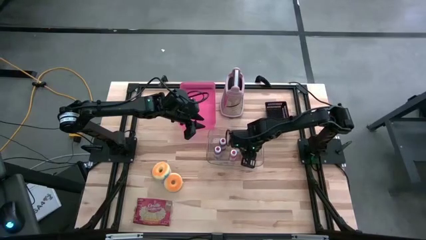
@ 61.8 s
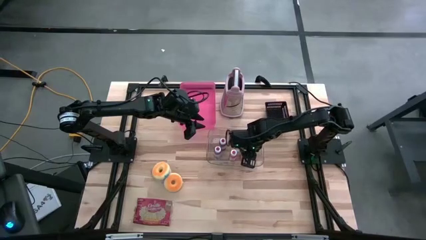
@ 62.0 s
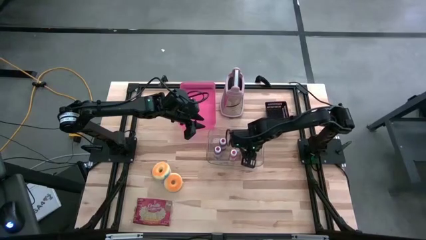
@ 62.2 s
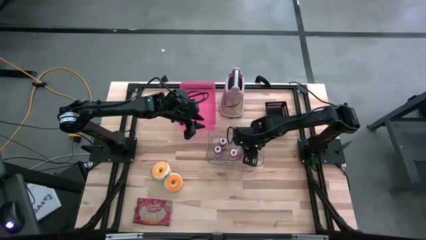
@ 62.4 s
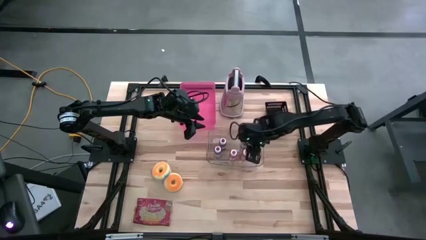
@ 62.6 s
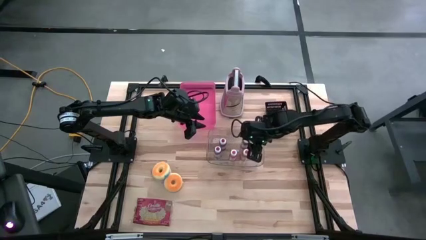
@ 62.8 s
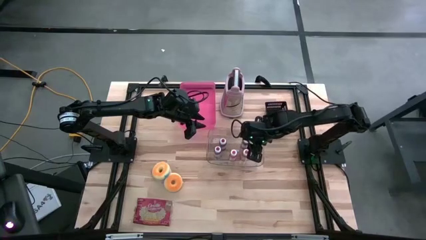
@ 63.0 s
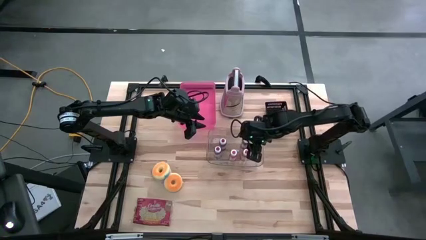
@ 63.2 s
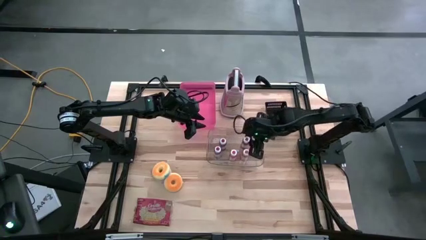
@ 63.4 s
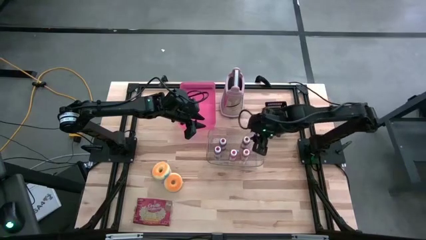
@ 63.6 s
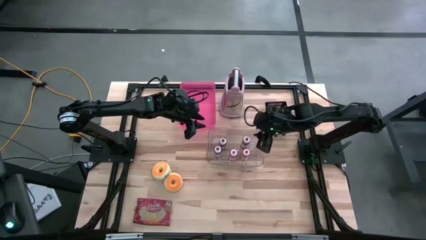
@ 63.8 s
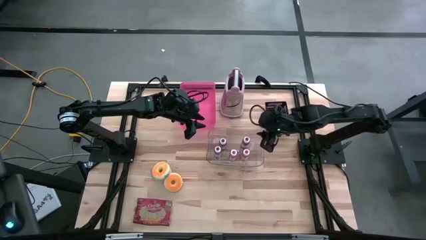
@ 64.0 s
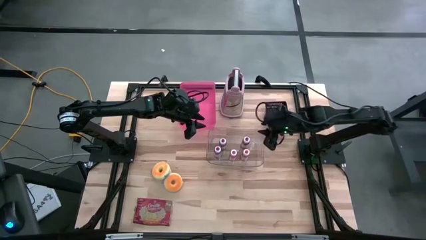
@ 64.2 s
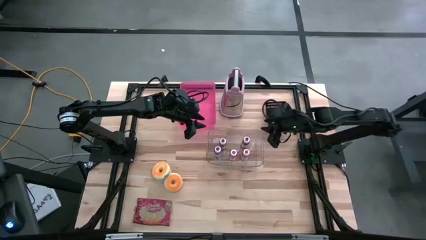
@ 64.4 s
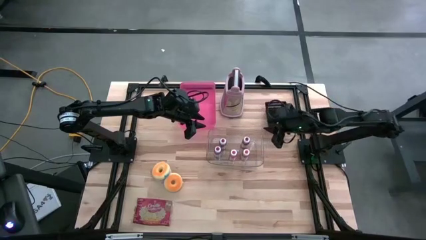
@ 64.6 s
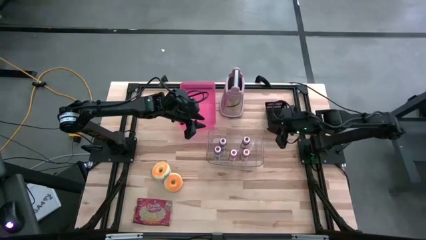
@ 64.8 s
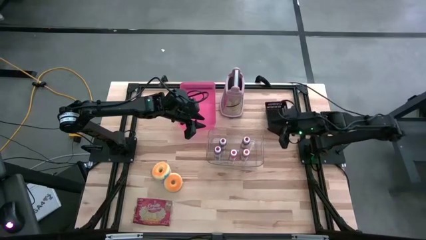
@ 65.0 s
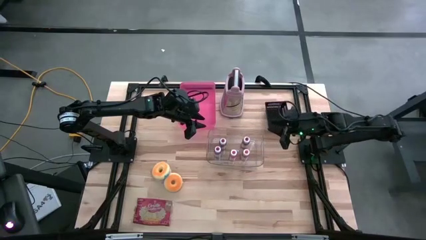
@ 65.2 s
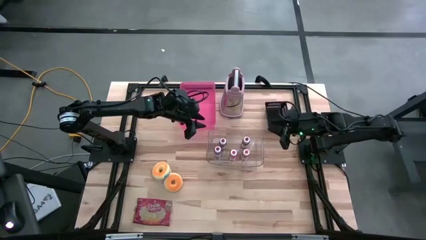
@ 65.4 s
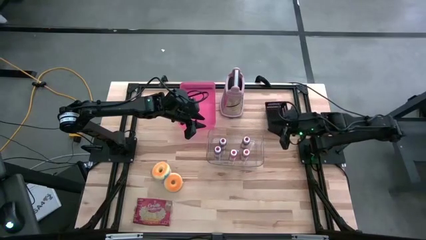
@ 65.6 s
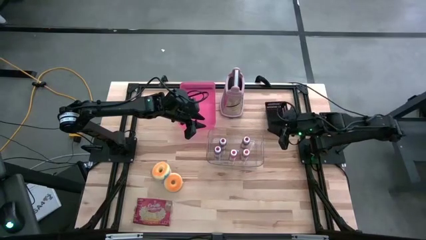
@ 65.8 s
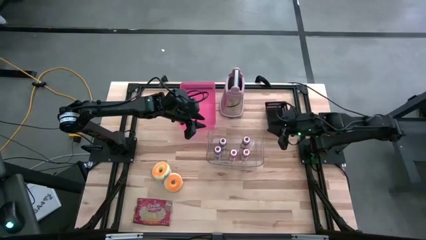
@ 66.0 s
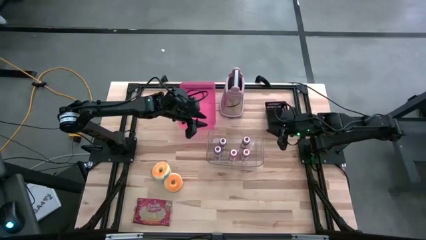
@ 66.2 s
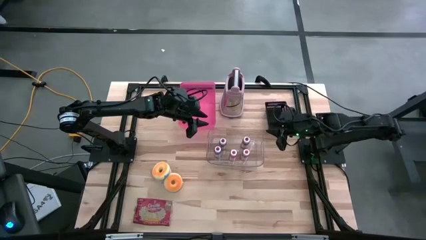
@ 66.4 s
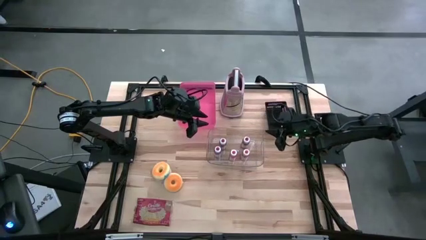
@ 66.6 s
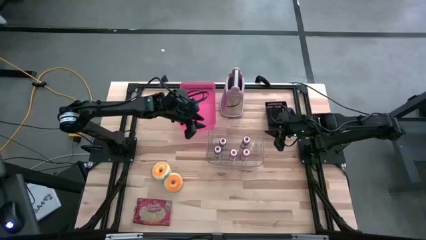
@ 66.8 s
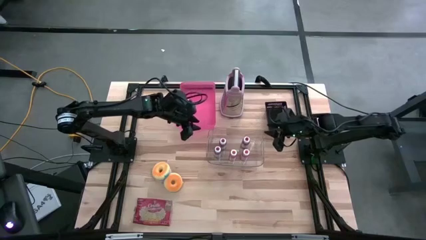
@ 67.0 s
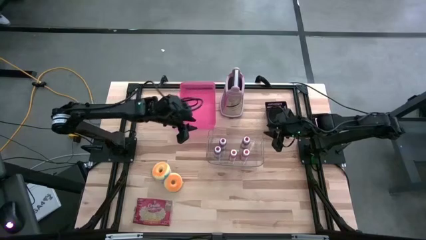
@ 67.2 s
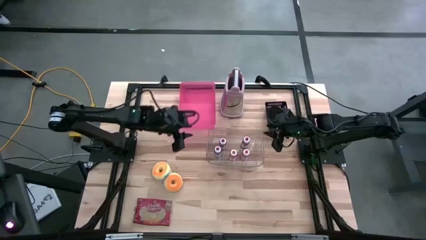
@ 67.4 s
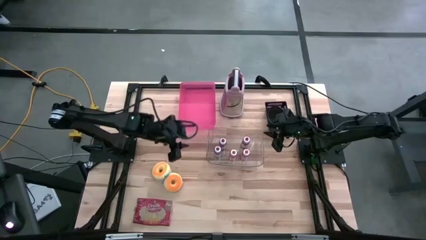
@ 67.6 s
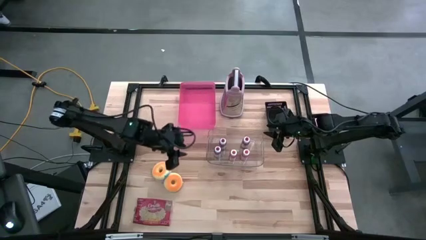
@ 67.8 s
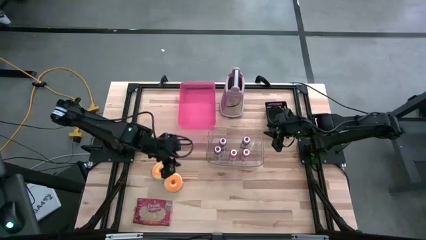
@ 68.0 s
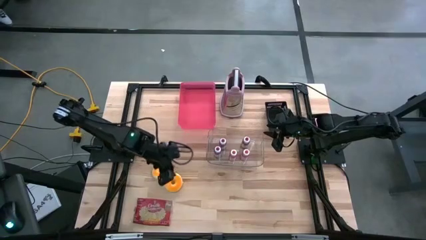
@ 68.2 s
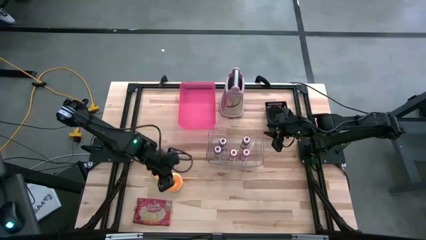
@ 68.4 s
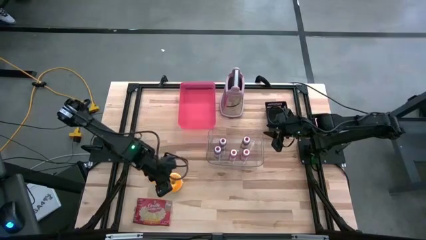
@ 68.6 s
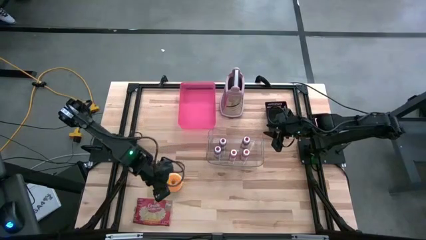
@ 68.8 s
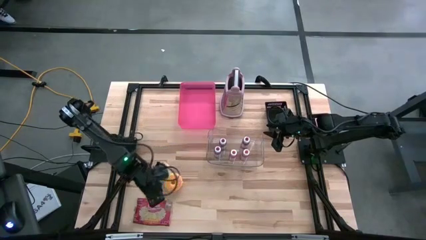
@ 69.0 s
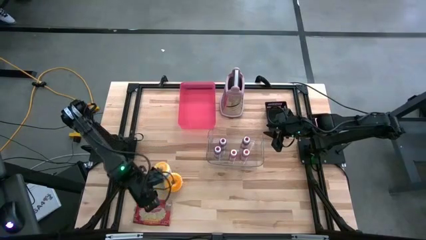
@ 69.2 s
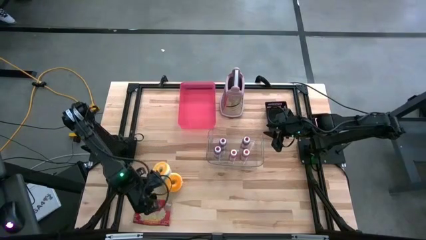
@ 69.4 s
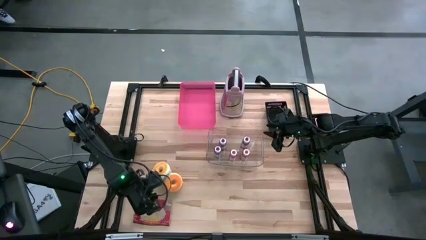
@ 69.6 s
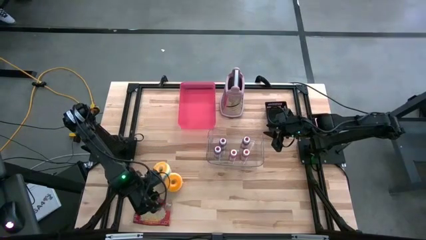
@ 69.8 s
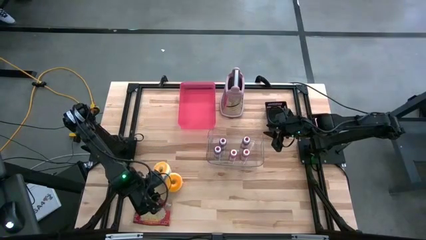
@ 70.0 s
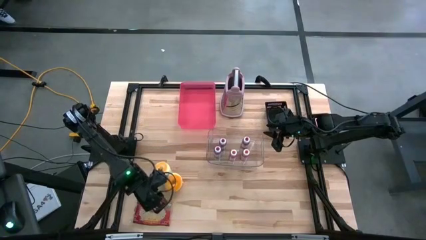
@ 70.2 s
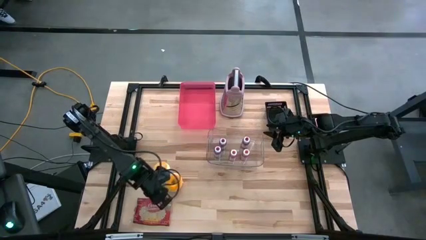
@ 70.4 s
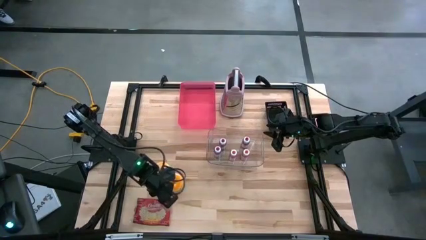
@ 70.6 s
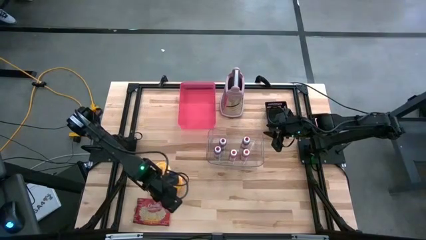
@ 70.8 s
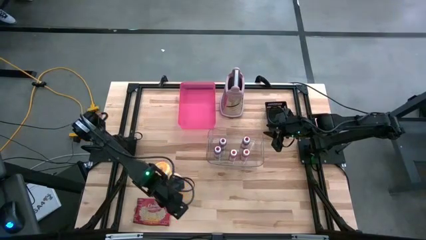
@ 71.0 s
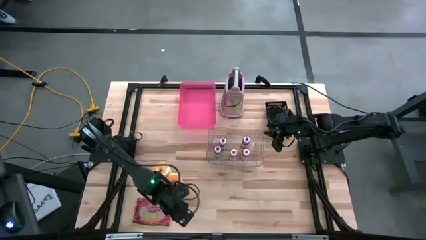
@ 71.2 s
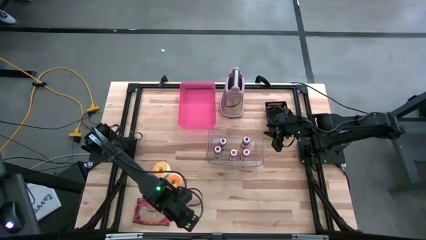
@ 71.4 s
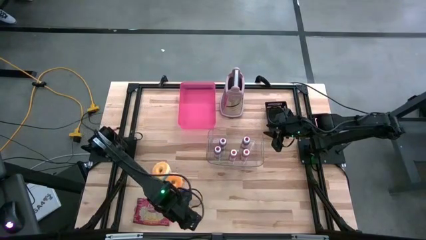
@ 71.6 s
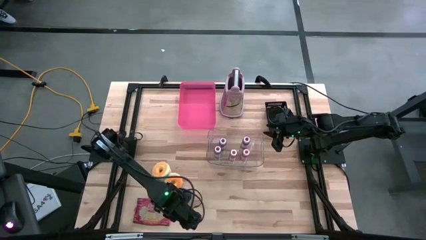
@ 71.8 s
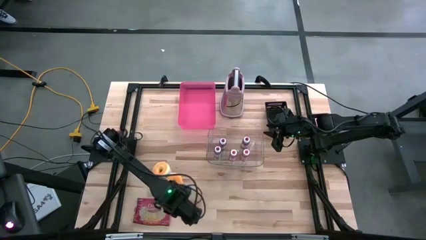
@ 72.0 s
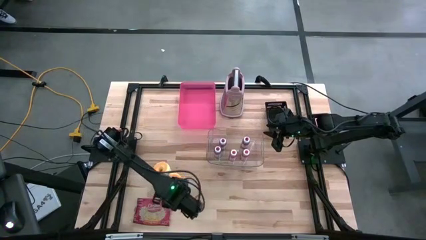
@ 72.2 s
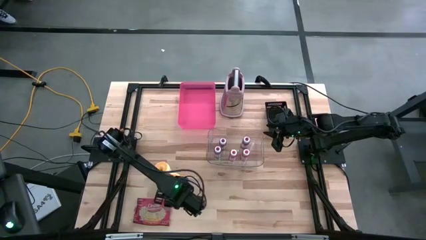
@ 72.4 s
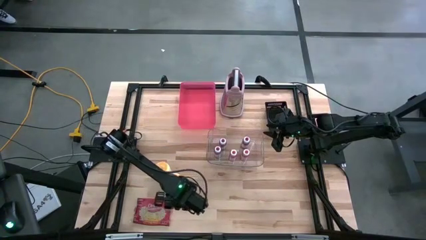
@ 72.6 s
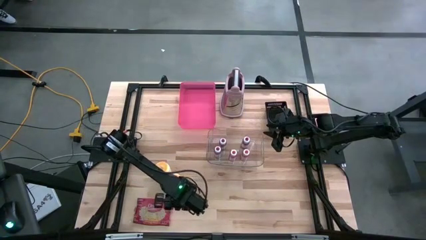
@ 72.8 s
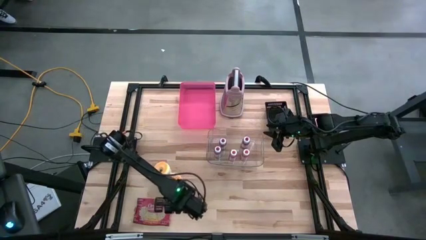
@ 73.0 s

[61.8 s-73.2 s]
Put the popcorn bag into the pink bin
